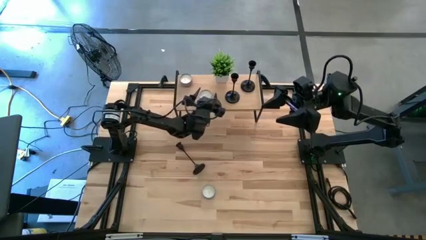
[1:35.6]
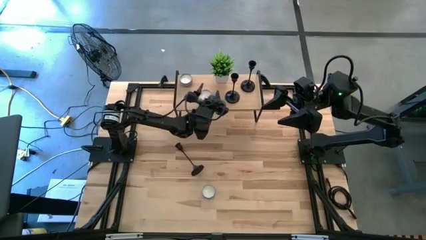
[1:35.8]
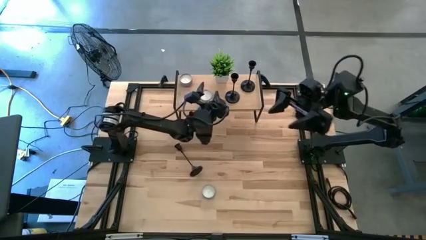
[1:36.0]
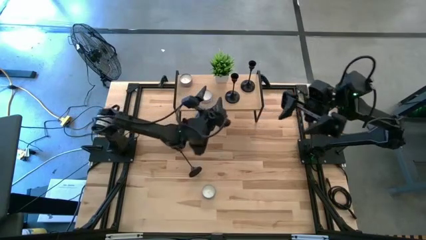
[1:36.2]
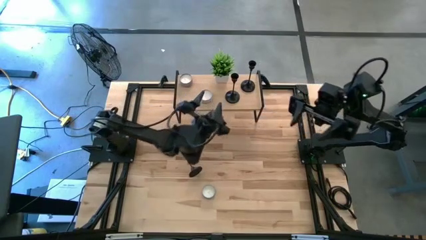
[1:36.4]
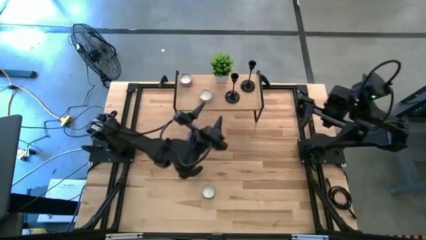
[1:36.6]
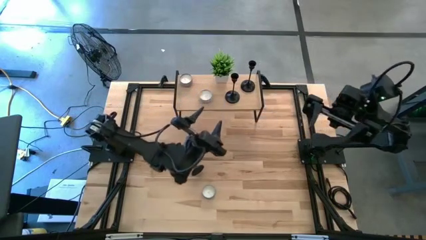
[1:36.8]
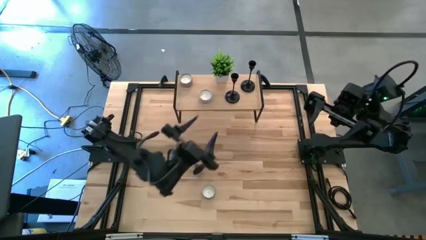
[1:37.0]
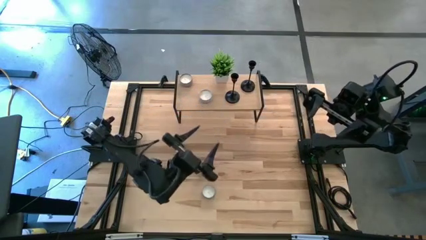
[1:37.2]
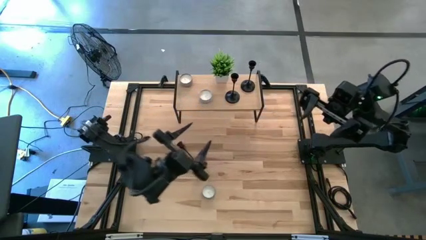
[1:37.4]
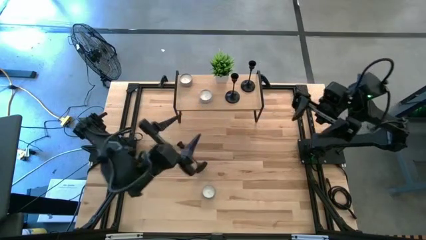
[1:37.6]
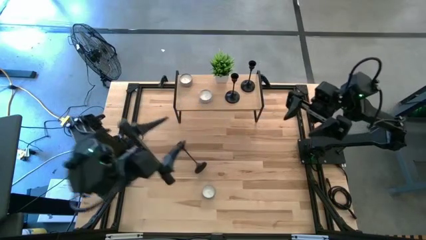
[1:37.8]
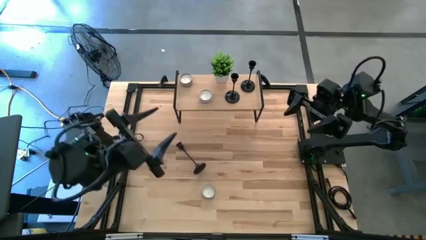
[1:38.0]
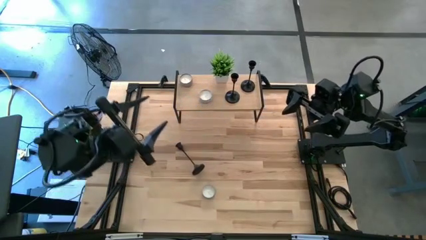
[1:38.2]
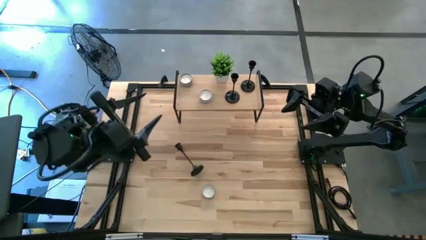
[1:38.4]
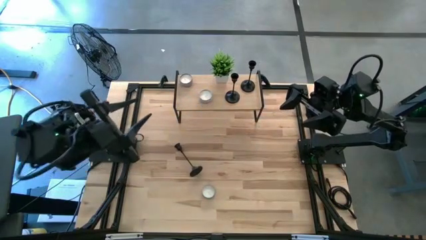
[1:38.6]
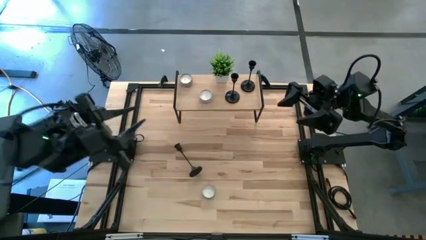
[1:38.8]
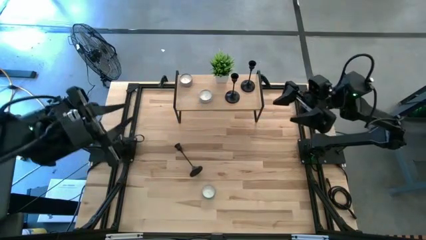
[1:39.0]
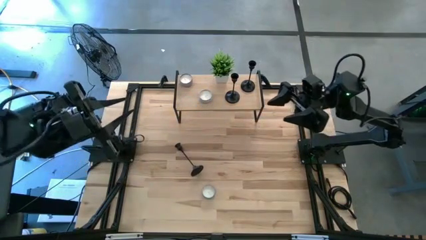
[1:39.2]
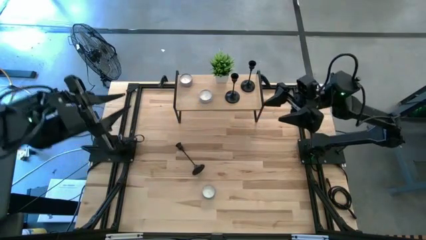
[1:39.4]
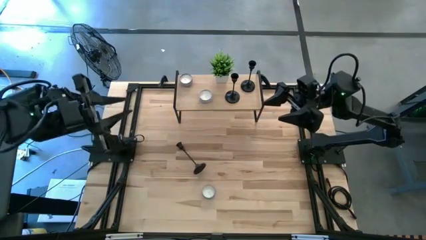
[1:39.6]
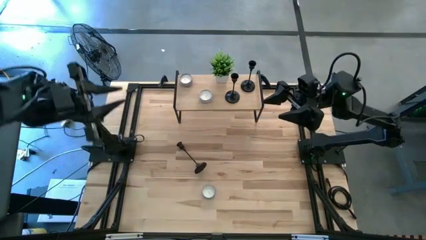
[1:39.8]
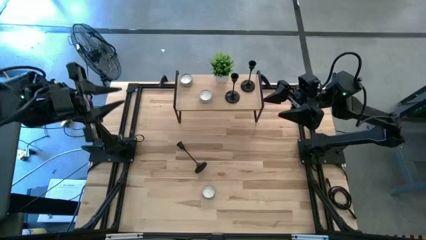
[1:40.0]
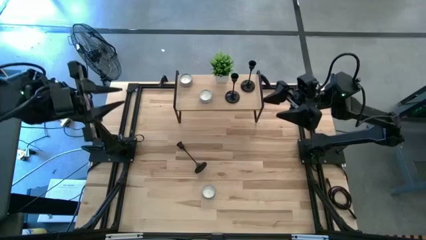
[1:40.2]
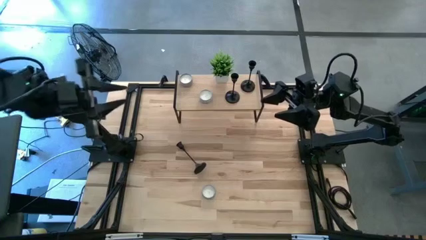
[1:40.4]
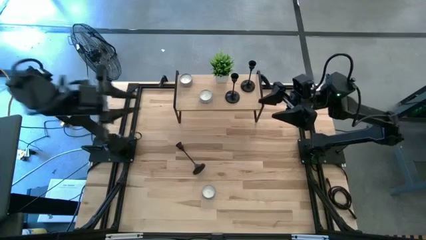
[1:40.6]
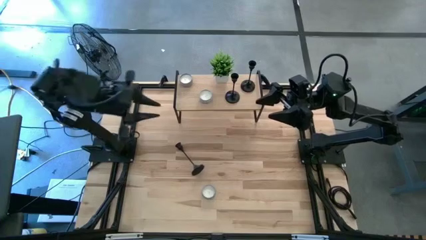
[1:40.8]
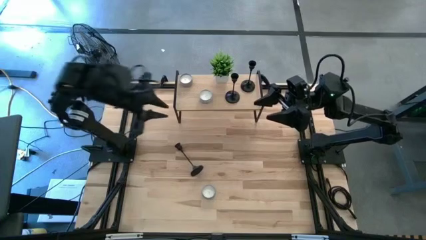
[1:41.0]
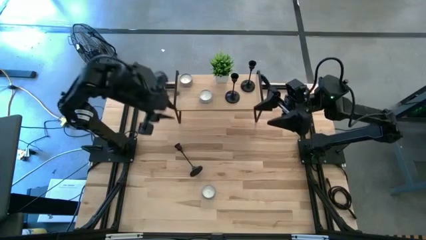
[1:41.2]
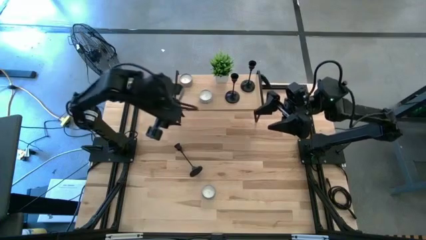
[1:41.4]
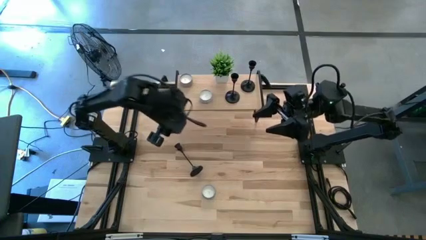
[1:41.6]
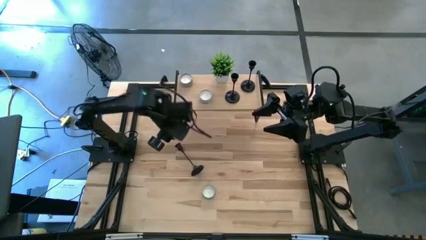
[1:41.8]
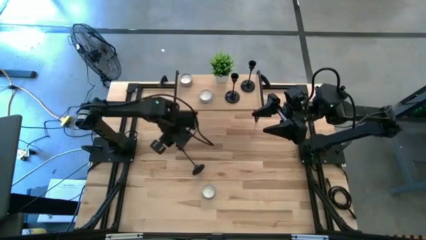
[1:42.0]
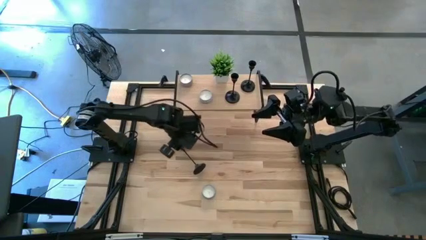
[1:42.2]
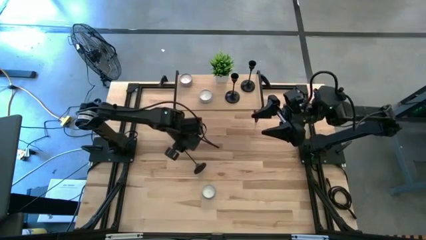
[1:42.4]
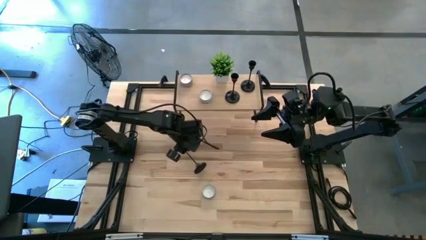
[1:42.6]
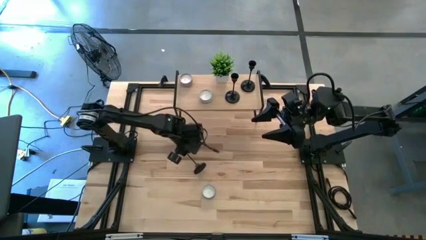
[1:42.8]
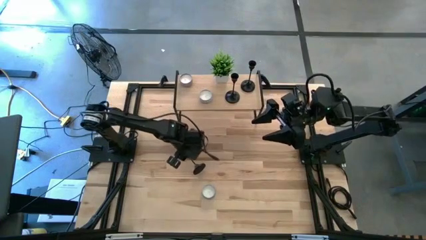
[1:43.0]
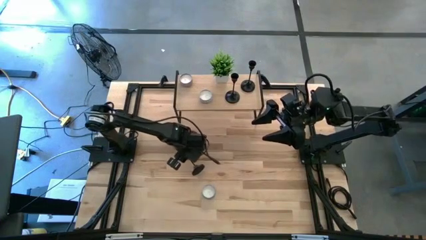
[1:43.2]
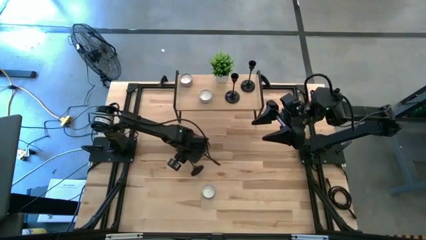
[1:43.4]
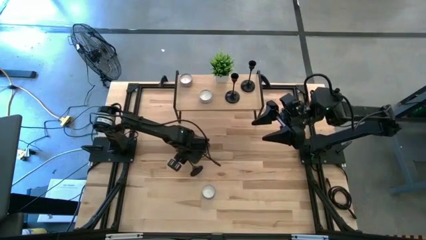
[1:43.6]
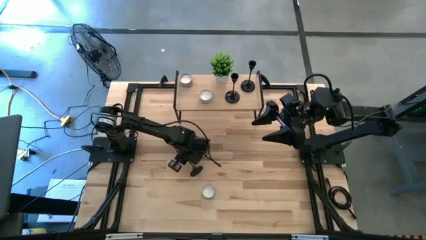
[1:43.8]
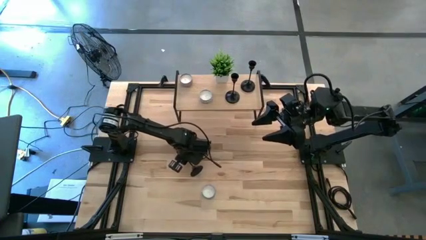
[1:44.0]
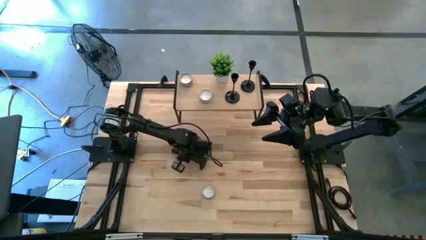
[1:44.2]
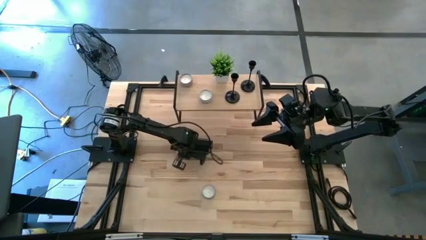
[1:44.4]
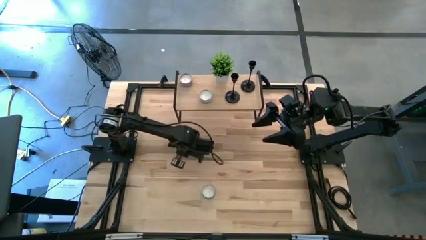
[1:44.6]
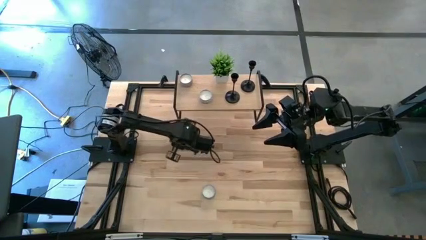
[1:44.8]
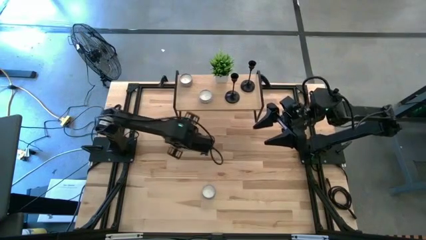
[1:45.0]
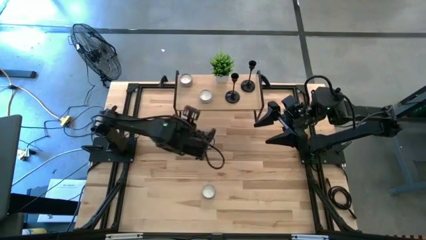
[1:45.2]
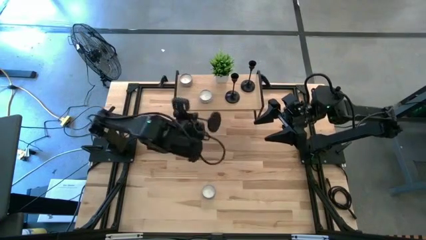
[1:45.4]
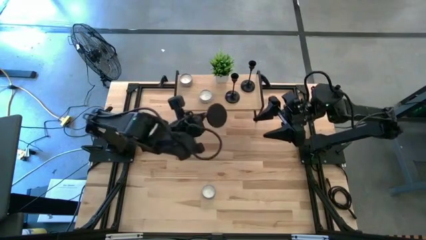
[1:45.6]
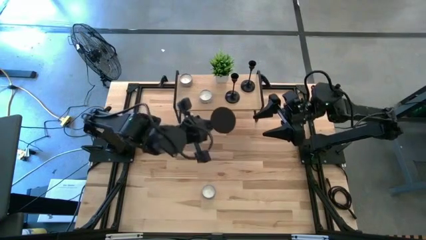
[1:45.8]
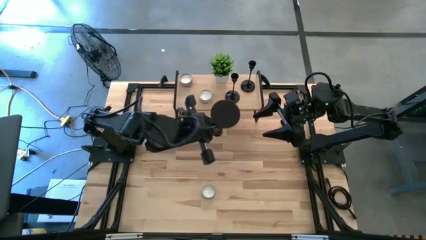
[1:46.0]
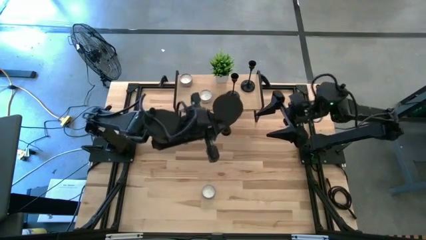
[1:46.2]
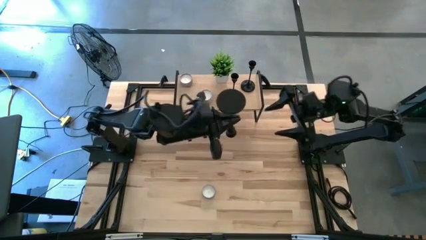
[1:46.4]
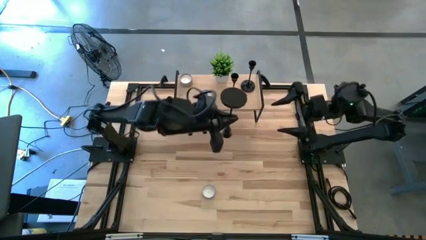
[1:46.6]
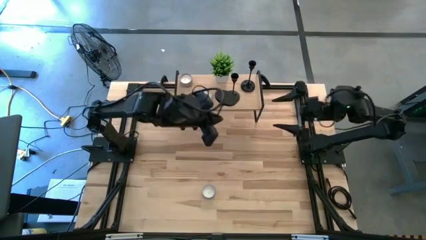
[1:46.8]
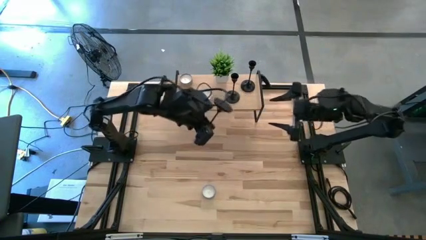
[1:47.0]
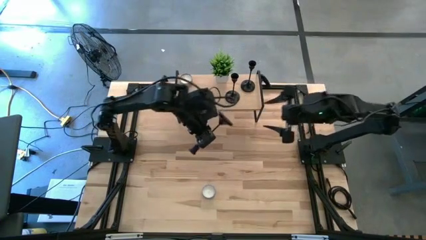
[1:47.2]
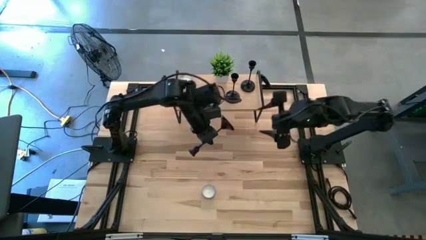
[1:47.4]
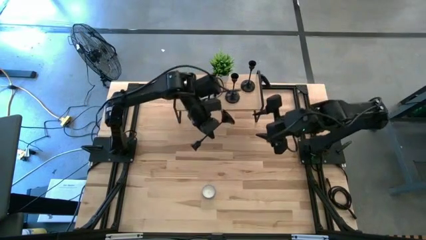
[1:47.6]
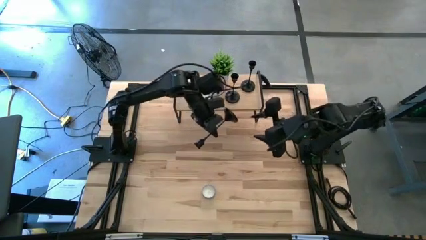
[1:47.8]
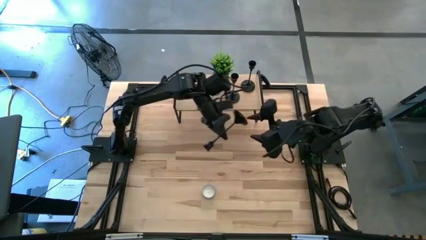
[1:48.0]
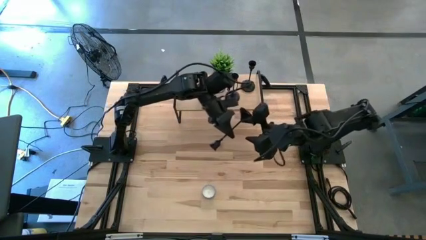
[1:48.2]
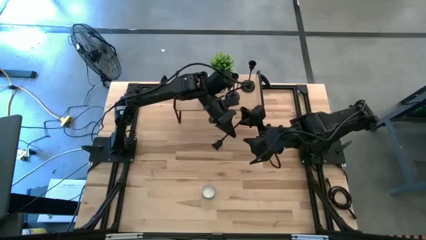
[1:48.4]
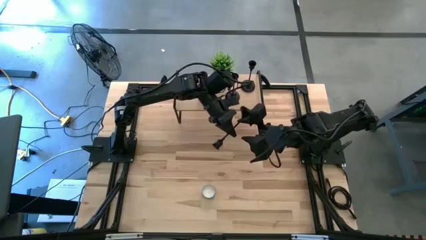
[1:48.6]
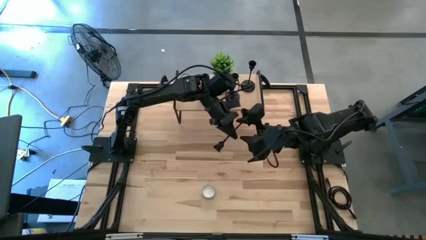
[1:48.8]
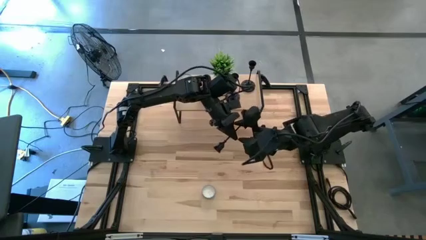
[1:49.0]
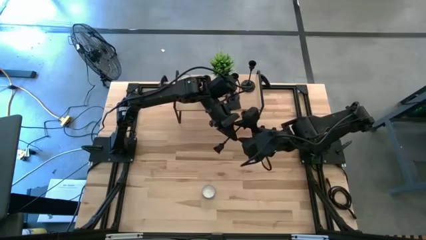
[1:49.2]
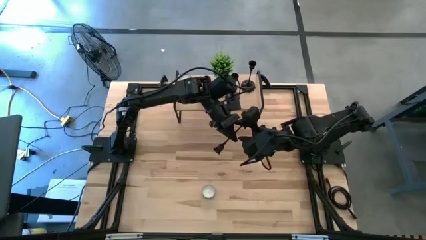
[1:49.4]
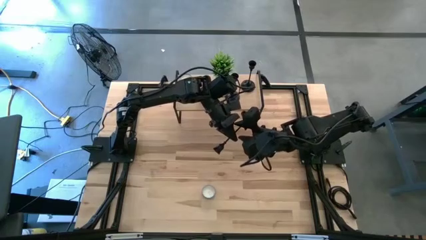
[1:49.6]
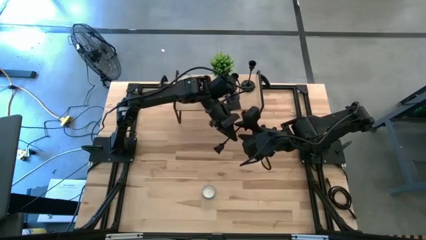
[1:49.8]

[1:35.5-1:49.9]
Task: Pick & Place candle stick holders
Put the black left candle holder on the shelf

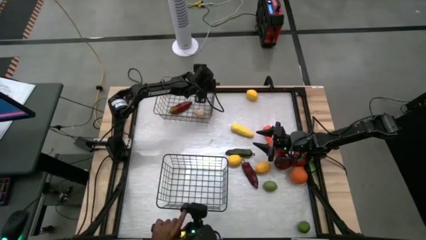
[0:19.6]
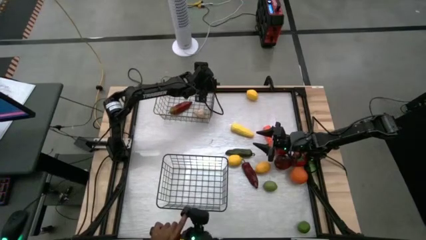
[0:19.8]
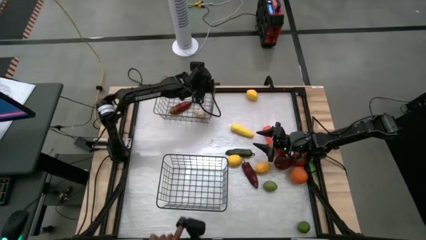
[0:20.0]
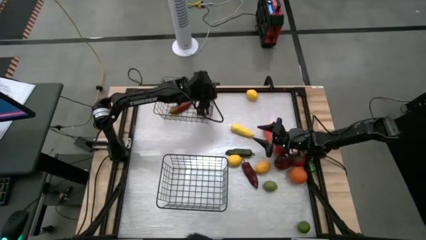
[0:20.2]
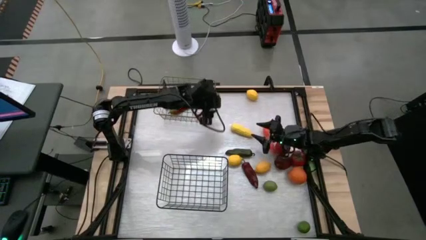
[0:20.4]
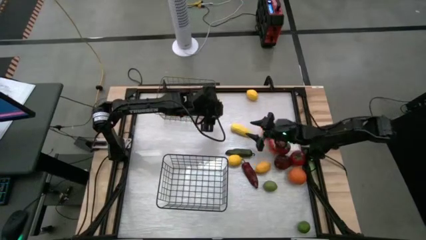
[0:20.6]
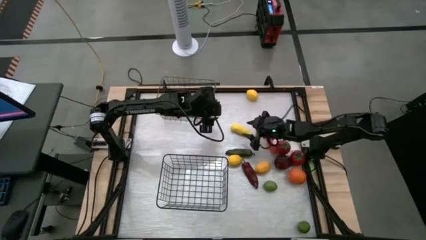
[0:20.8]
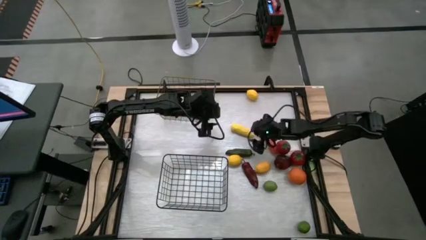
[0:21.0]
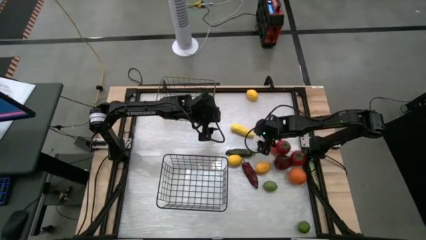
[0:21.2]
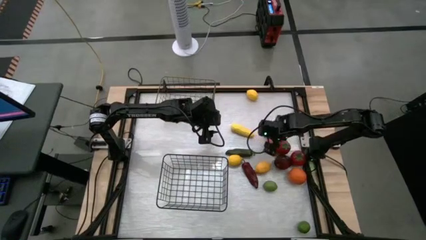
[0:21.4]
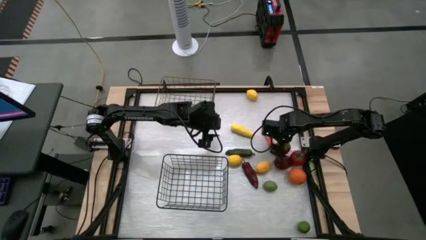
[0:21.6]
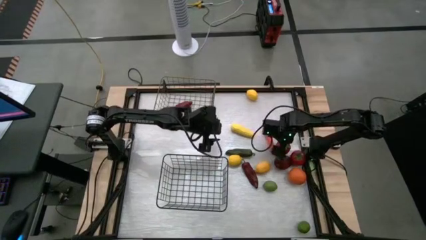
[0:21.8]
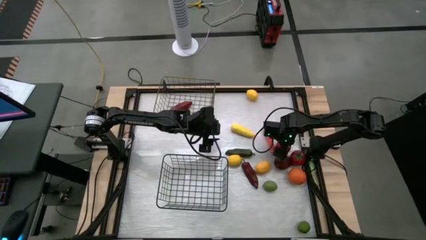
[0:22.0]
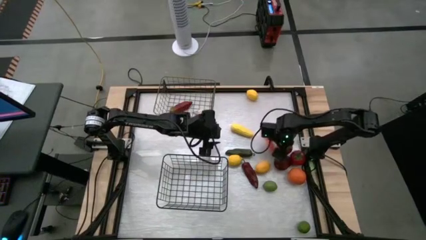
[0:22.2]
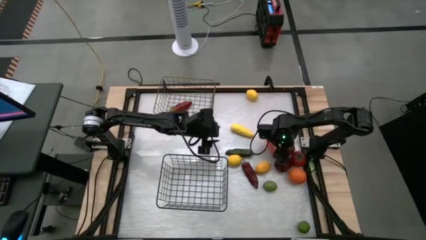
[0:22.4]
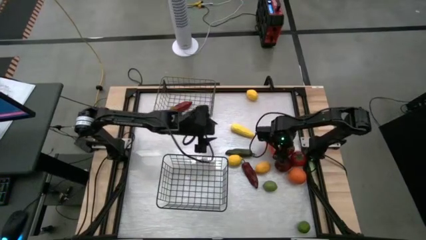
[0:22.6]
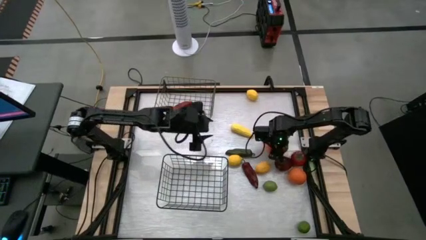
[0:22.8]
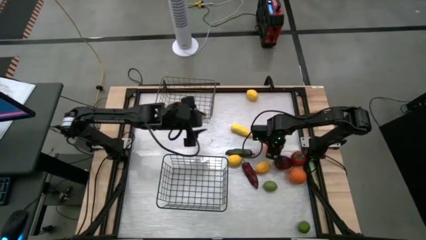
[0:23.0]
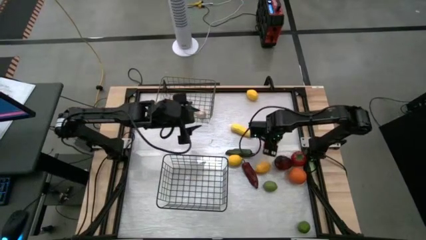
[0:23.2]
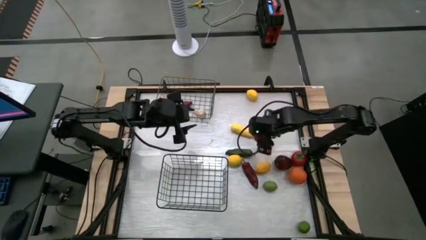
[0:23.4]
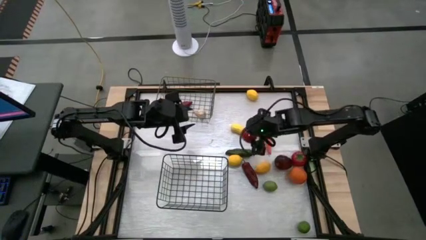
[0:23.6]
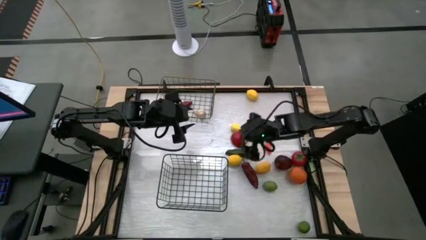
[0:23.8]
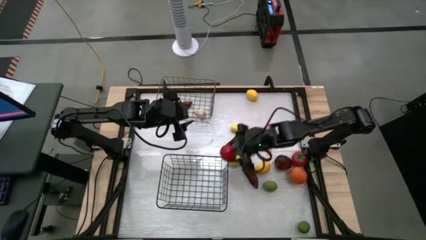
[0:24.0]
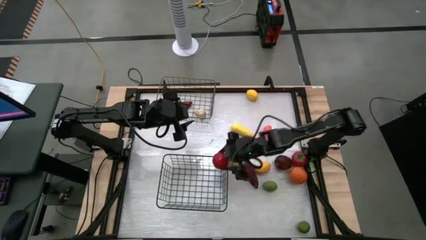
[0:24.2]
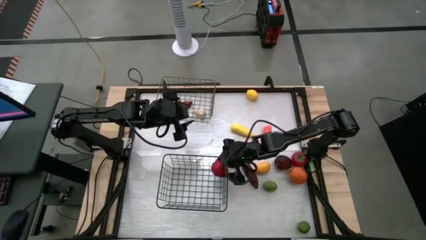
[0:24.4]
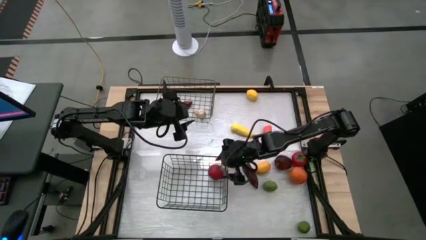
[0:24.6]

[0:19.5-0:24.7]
Task: Sort produce into baskets
Put the red tomato into the bottom wire basket
